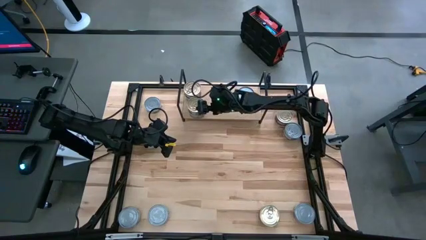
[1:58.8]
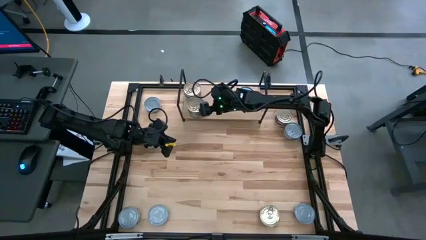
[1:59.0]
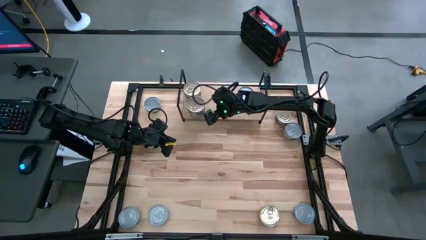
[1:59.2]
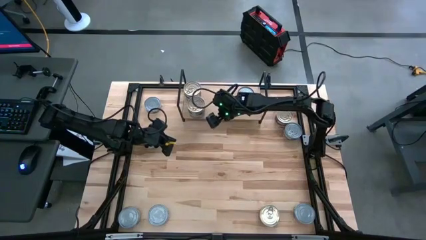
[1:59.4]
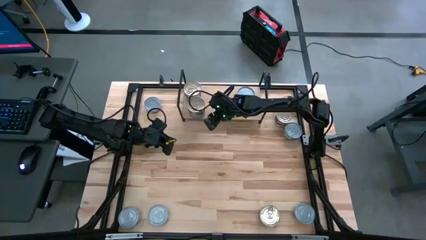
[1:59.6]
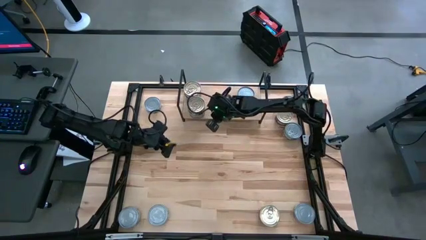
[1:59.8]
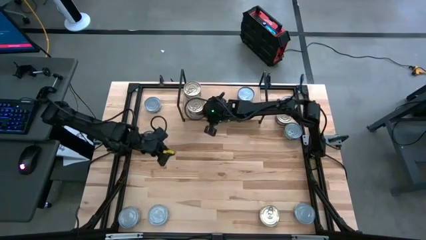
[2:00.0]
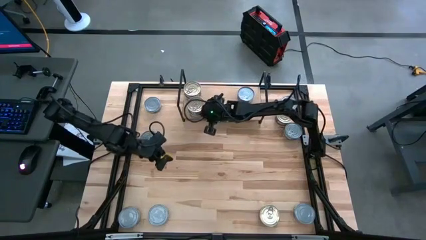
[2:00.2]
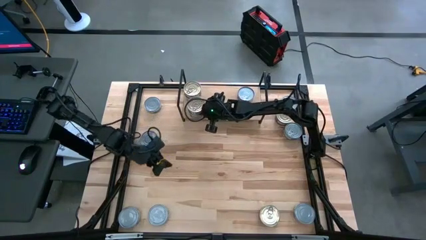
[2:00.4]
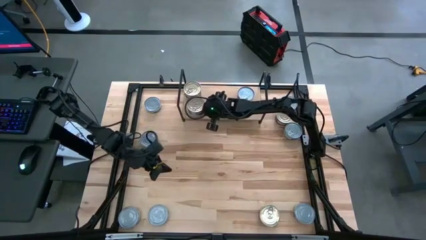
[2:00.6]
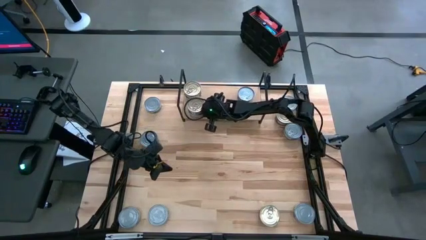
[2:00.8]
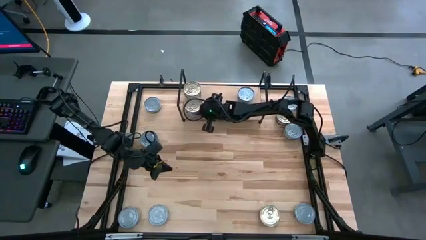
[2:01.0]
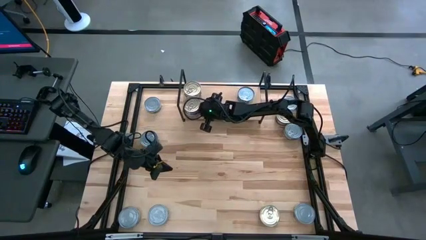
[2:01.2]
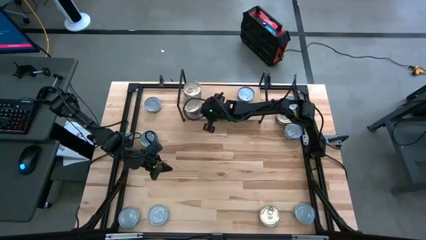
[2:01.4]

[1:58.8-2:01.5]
Task: Stack canned seafood by type on shelf
Adjust the stacked blue pink tuna cans on the shelf

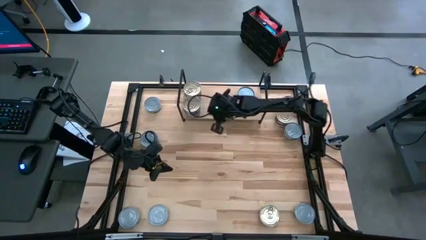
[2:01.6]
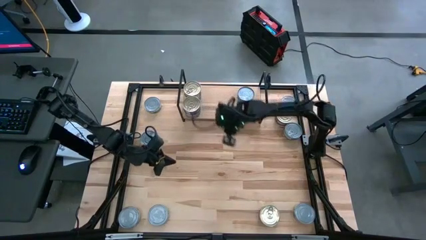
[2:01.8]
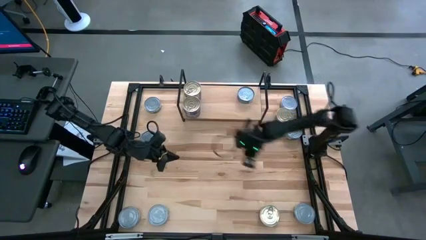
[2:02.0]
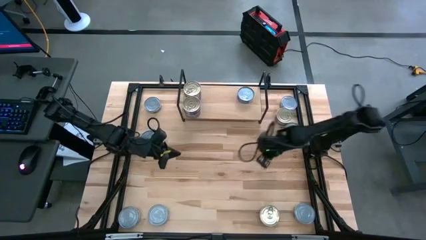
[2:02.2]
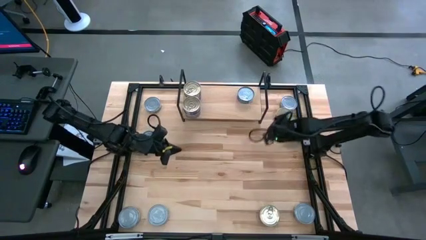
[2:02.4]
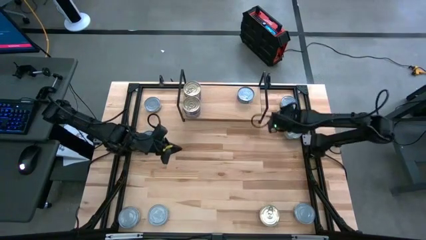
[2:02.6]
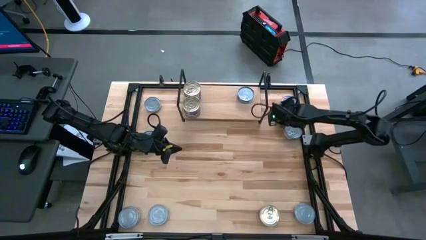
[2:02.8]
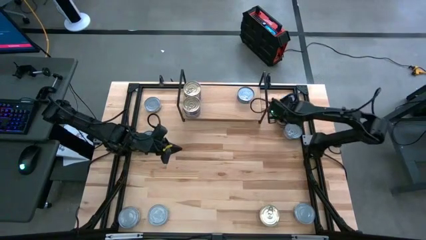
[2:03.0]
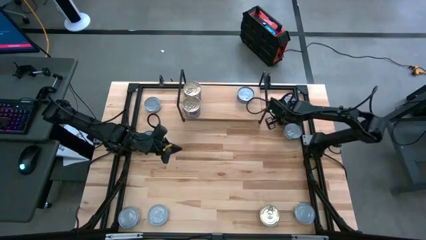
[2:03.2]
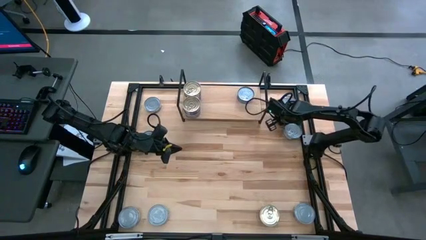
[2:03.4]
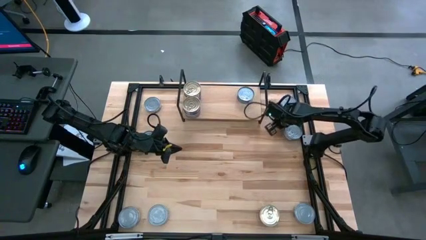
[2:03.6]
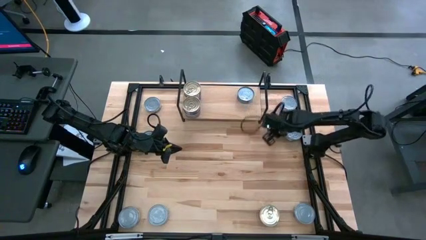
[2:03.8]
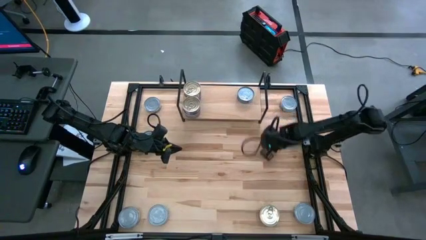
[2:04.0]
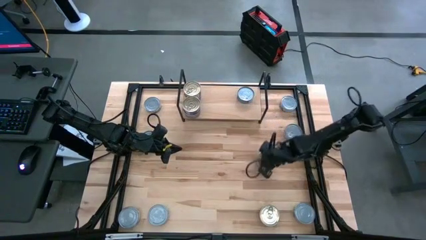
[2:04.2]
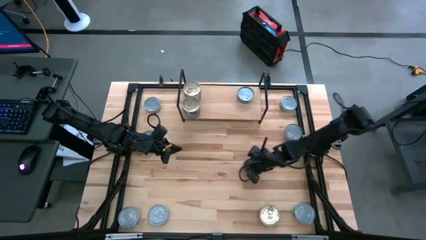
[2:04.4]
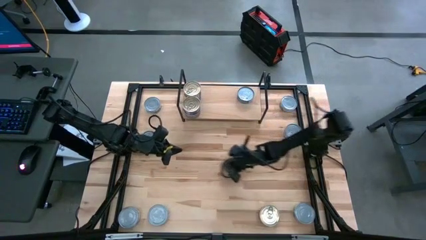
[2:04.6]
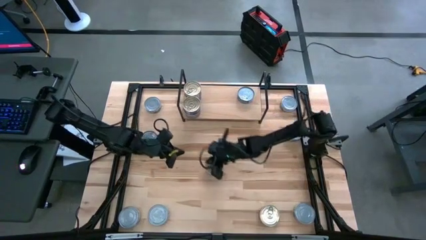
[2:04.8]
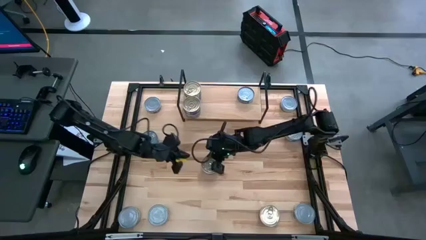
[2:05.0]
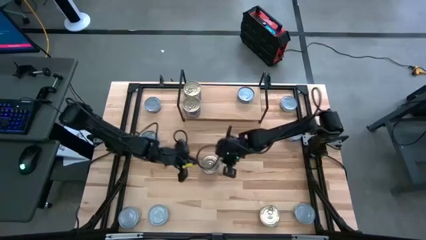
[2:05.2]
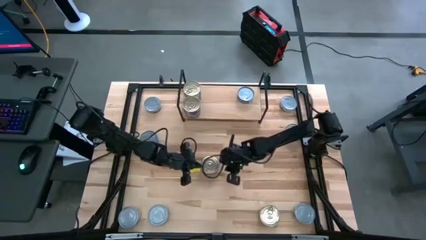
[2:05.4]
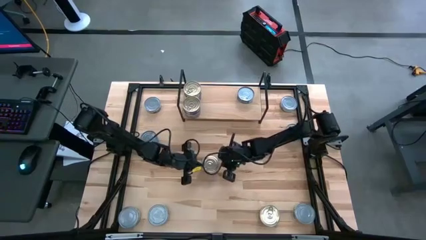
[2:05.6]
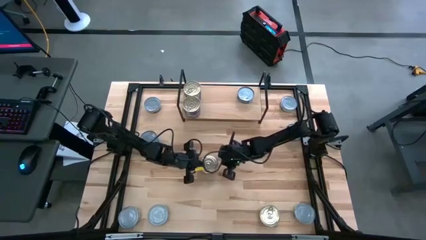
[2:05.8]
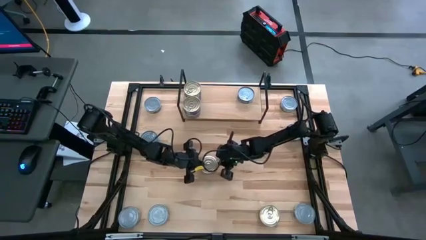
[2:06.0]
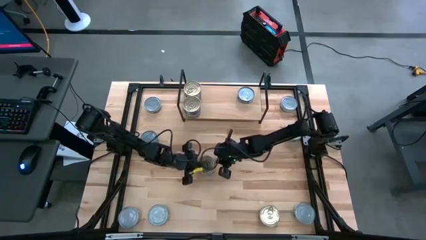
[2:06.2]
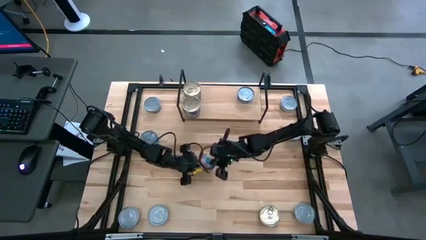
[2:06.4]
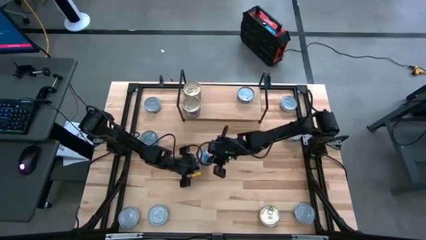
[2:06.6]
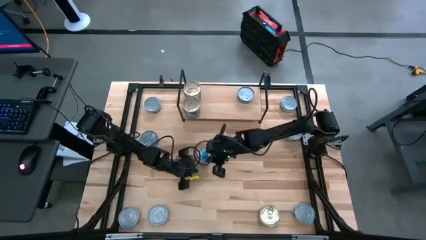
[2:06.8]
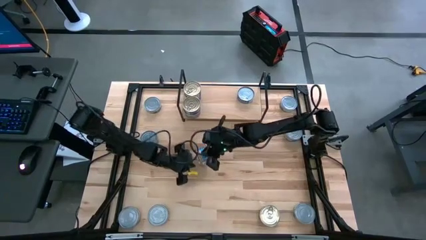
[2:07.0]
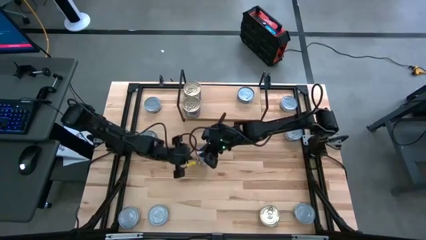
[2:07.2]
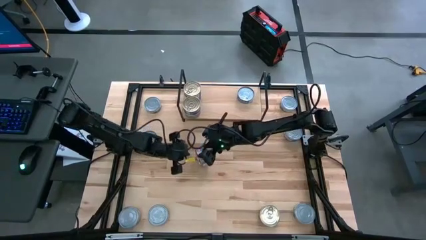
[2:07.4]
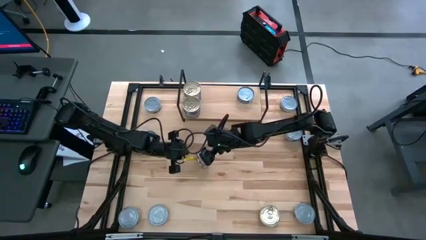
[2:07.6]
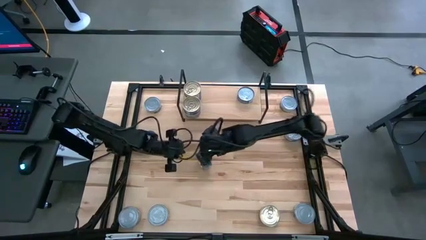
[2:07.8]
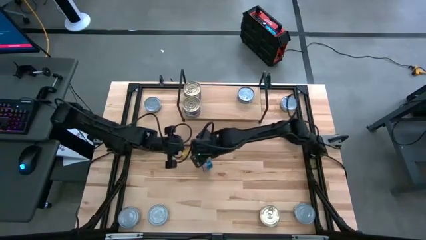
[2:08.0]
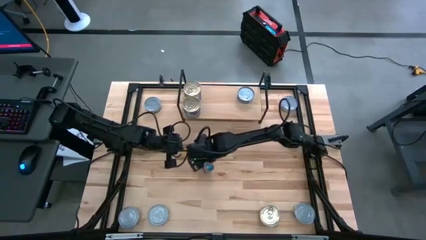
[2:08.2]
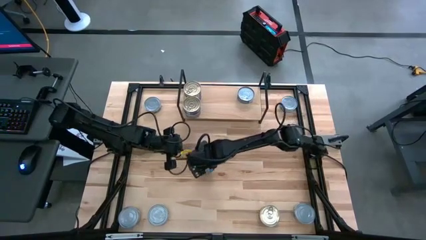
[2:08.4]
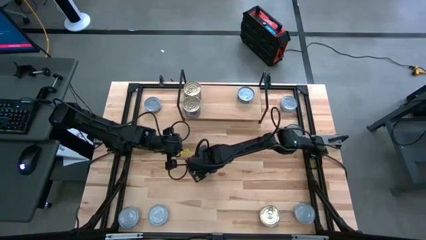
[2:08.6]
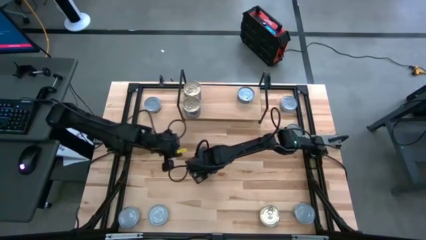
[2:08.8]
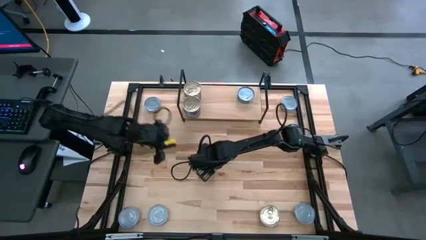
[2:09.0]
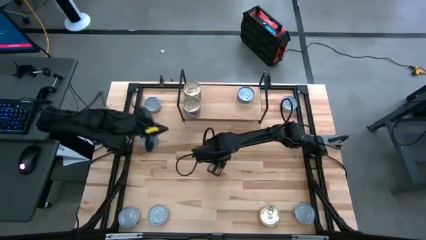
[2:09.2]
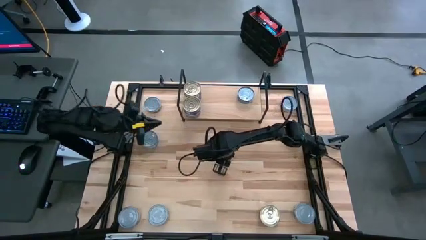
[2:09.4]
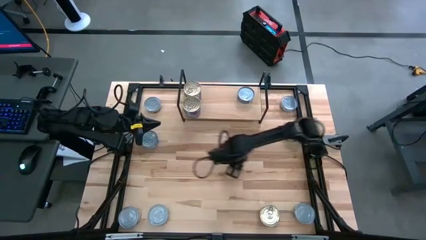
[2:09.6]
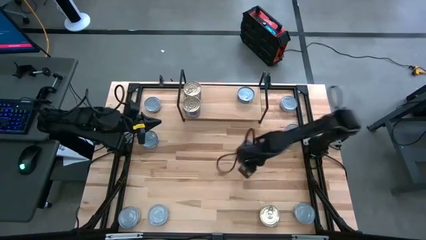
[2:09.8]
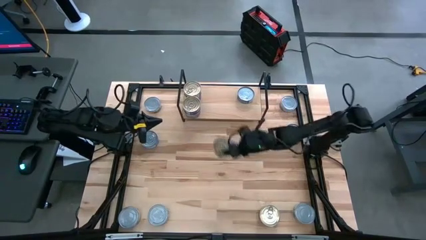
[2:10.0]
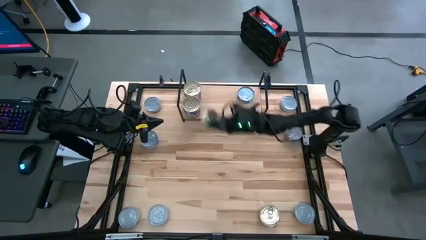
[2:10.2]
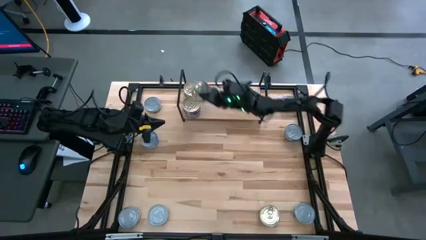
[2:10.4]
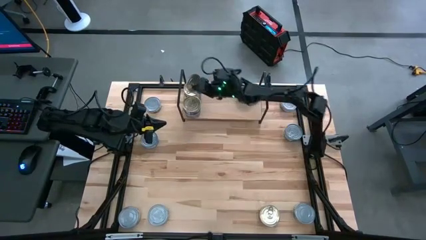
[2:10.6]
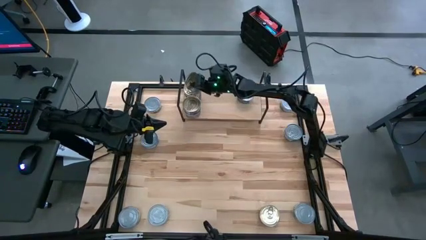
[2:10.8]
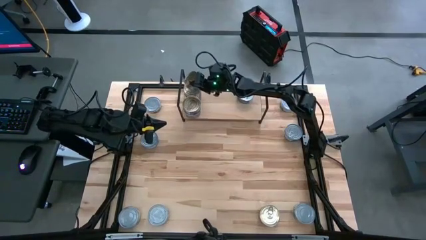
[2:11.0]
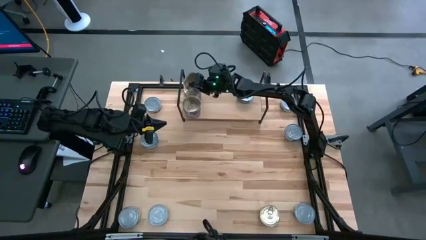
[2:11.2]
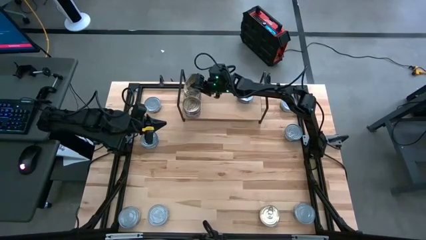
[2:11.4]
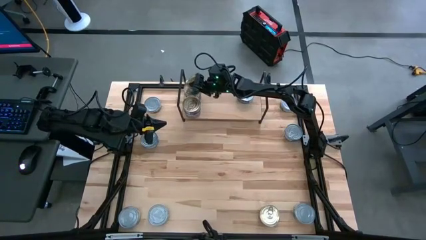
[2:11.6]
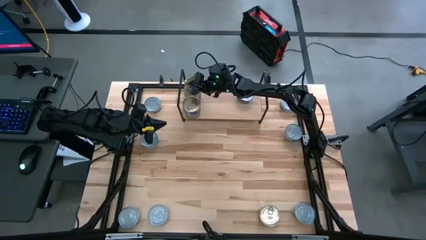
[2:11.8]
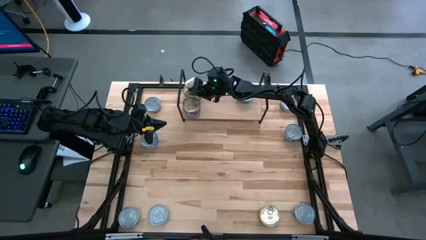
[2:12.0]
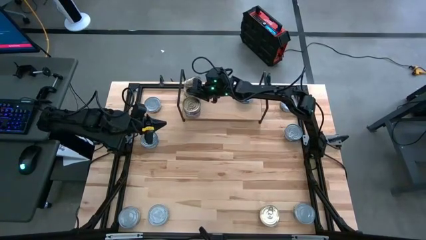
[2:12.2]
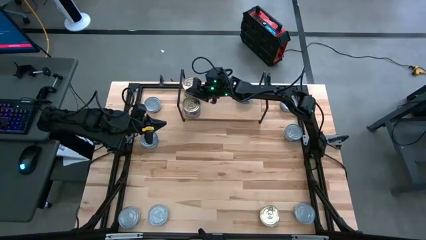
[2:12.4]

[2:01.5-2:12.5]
Stack the blue pink tuna can on top of the other blue pink tuna cans on the shelf

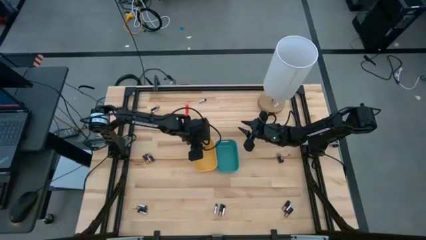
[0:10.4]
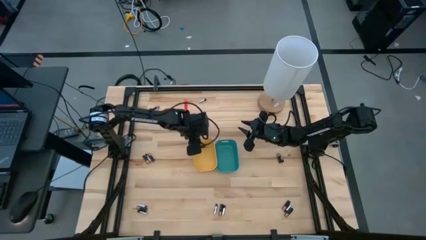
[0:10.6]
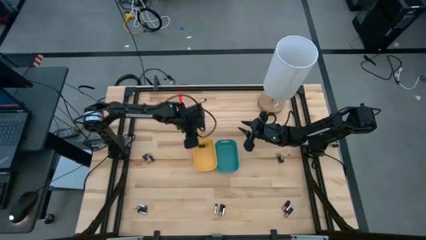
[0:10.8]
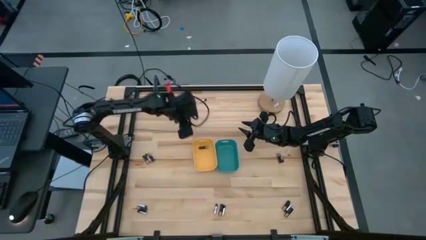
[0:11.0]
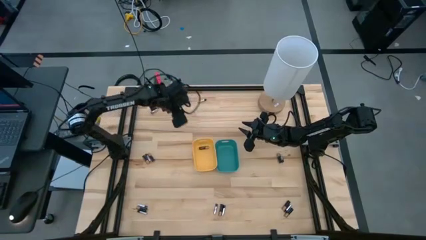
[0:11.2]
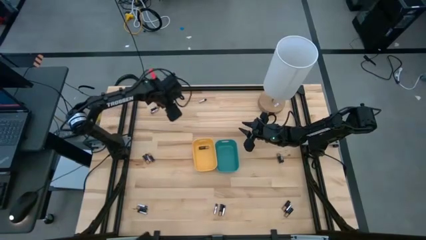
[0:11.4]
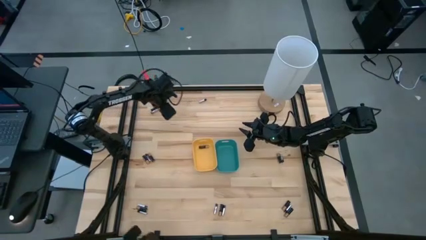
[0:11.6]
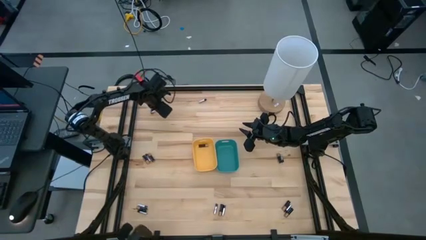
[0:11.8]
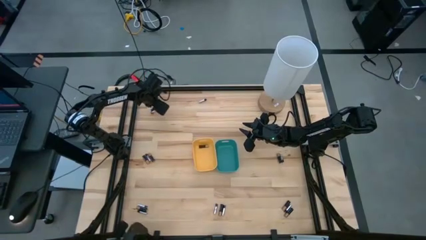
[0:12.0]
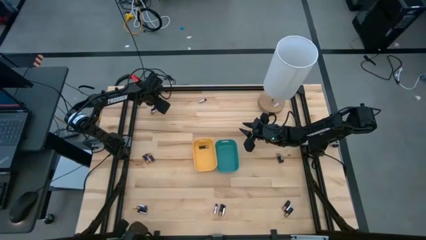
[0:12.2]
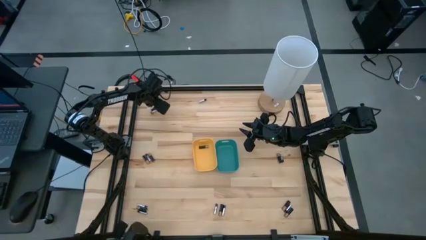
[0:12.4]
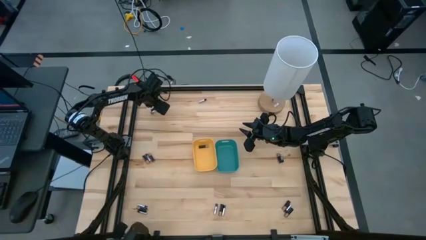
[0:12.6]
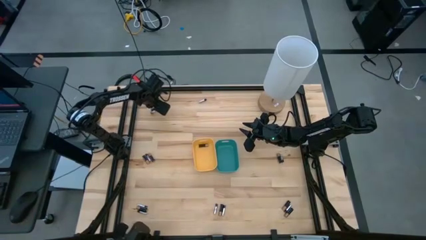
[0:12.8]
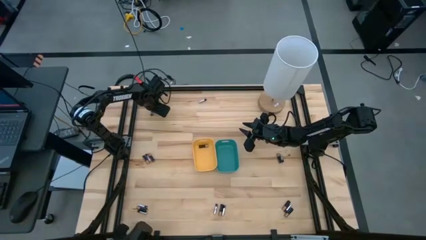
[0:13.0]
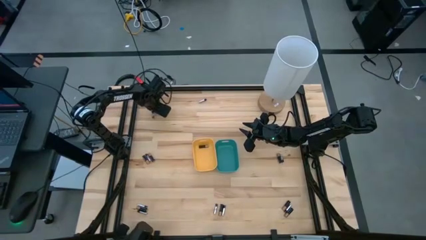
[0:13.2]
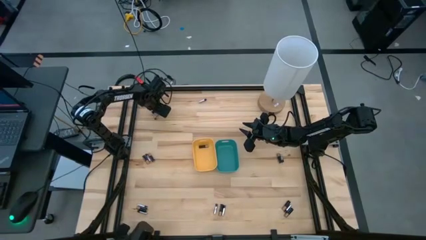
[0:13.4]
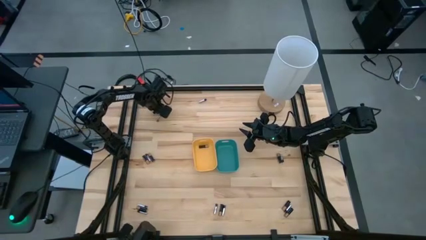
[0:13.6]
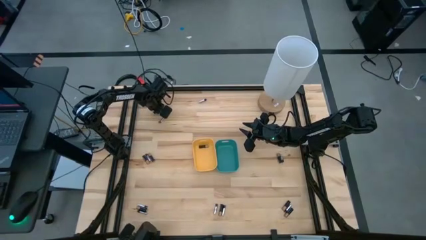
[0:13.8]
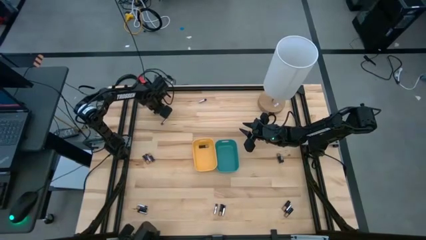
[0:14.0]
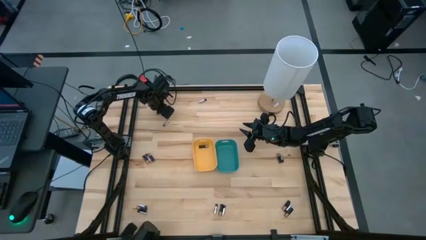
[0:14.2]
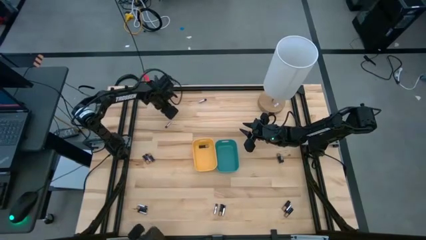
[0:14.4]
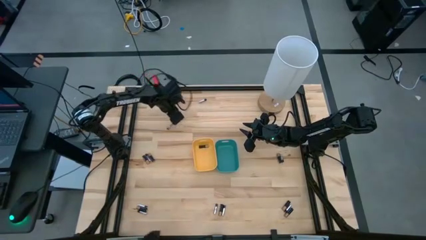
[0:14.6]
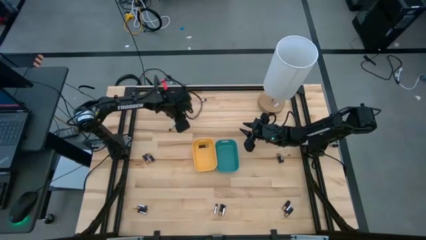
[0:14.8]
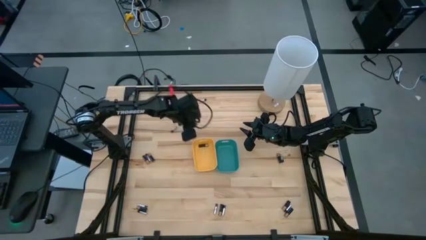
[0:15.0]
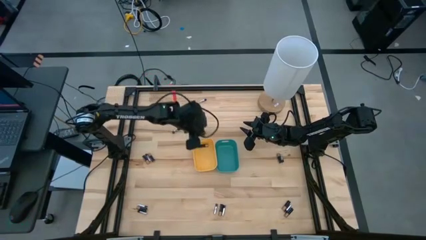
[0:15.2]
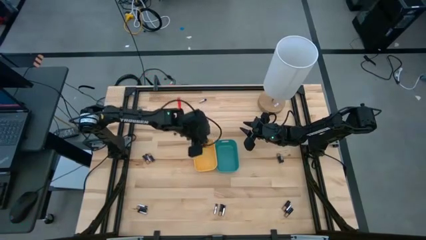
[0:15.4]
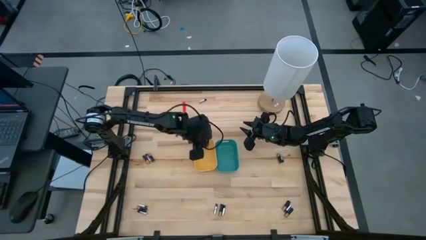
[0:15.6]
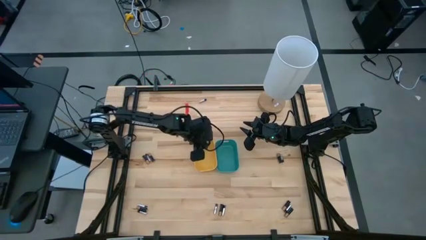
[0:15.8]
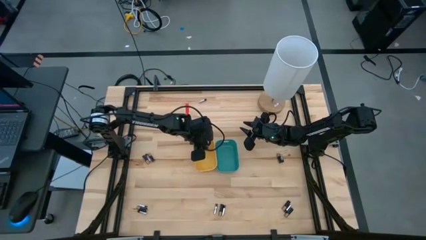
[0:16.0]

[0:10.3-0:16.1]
Task: Sort batteries
Put the black battery into the yellow bin
